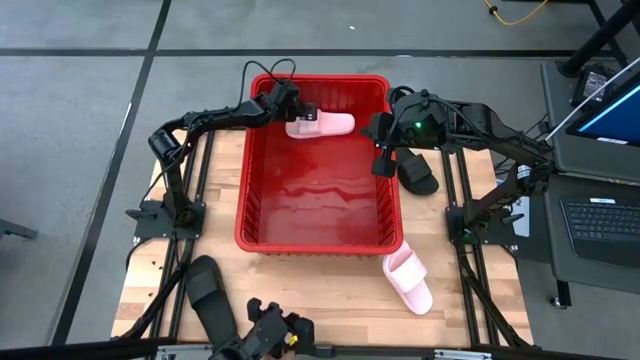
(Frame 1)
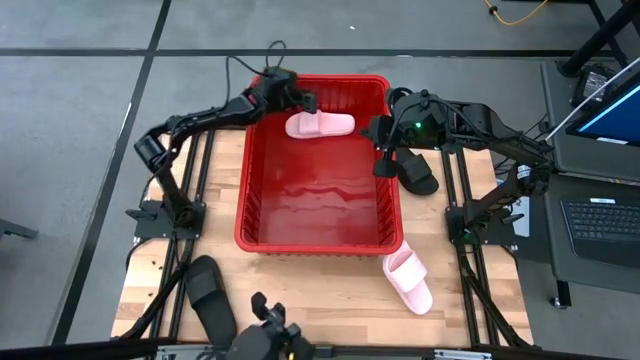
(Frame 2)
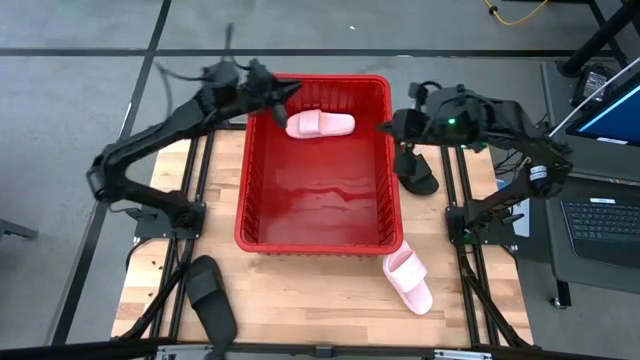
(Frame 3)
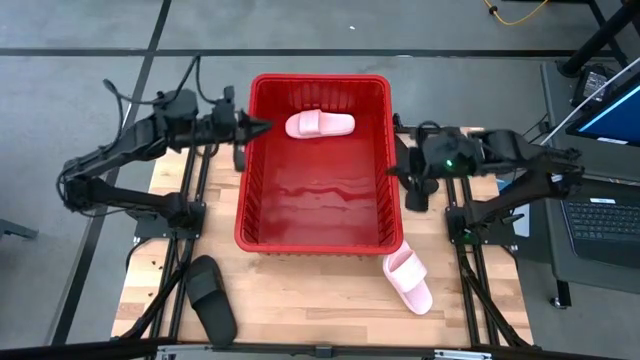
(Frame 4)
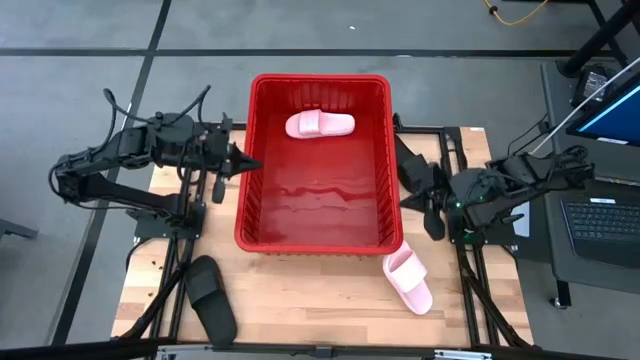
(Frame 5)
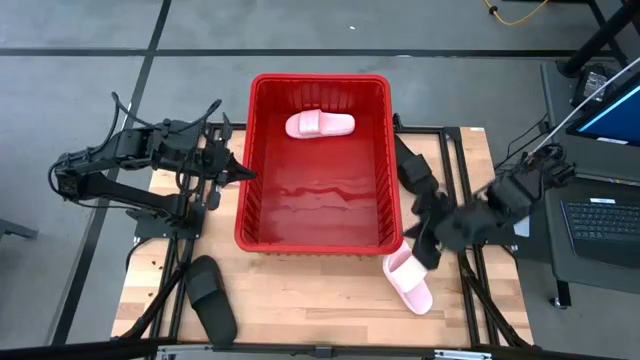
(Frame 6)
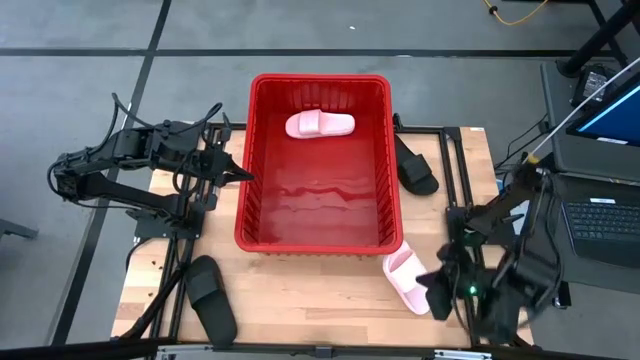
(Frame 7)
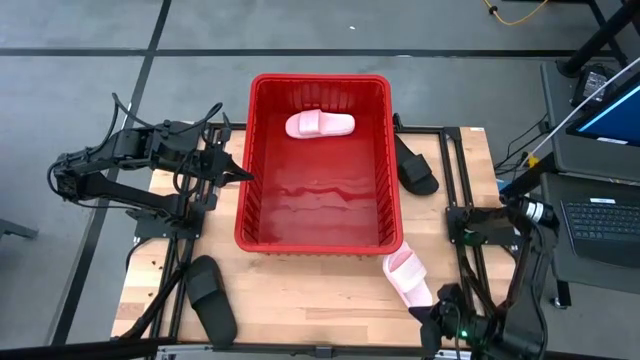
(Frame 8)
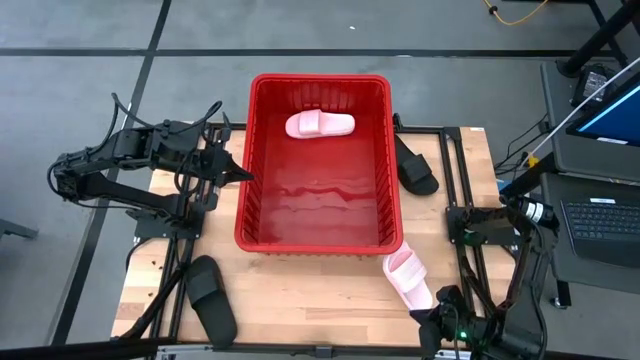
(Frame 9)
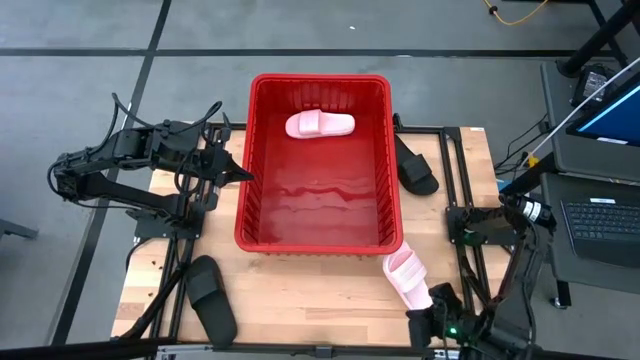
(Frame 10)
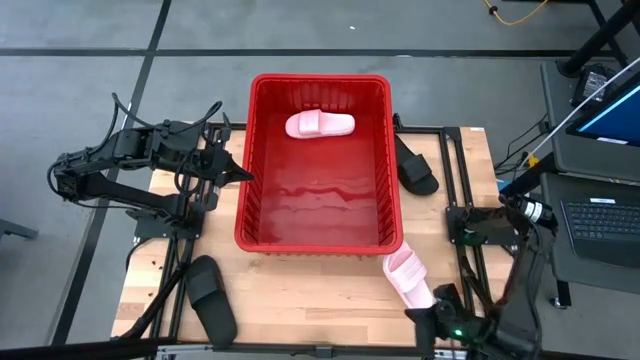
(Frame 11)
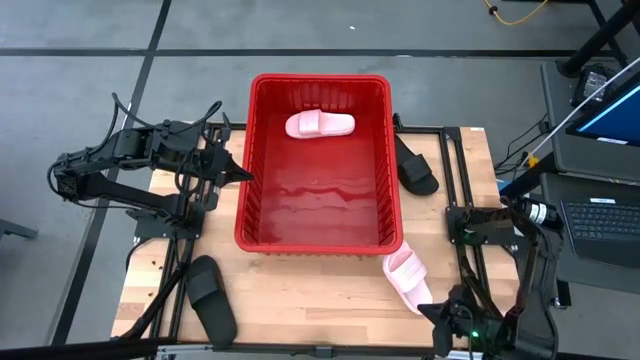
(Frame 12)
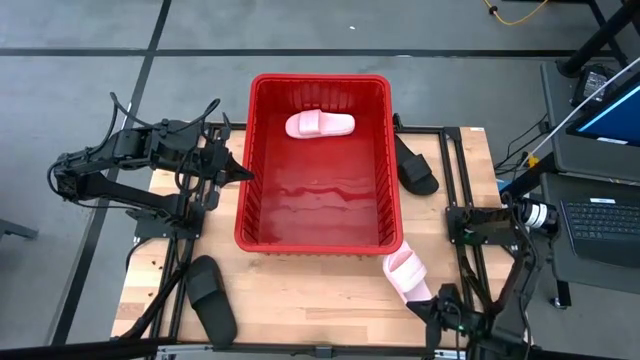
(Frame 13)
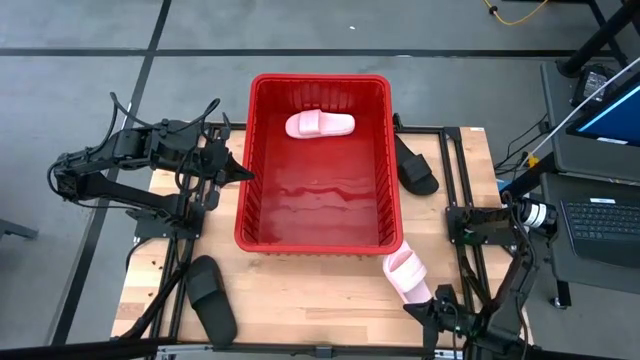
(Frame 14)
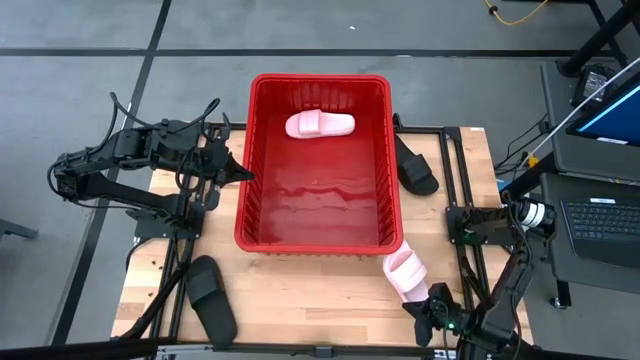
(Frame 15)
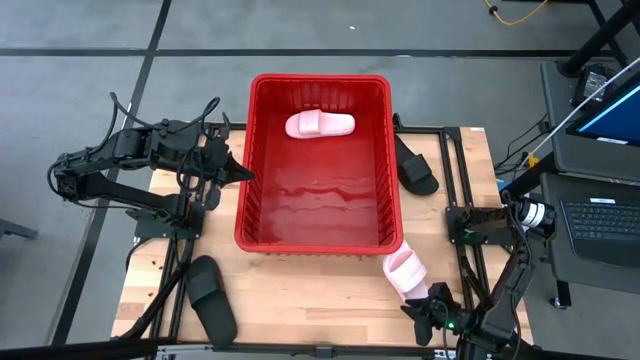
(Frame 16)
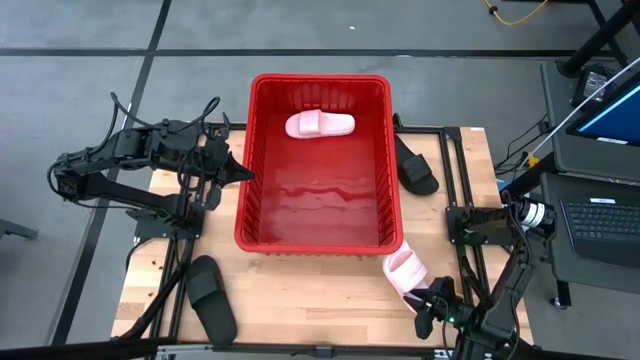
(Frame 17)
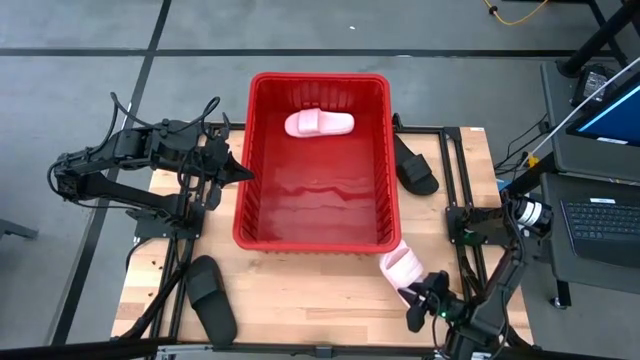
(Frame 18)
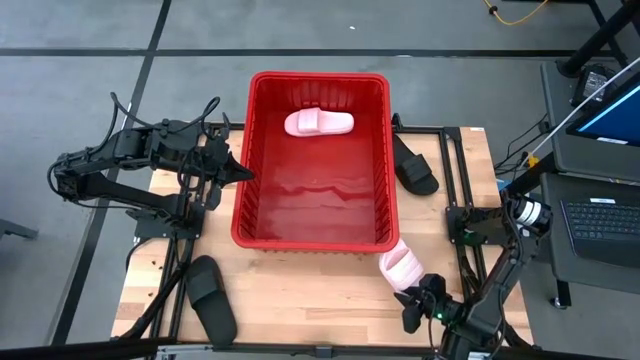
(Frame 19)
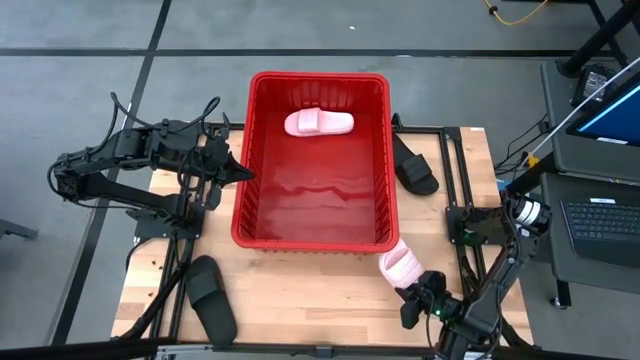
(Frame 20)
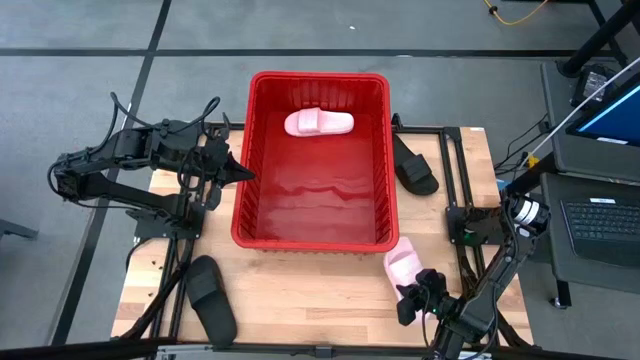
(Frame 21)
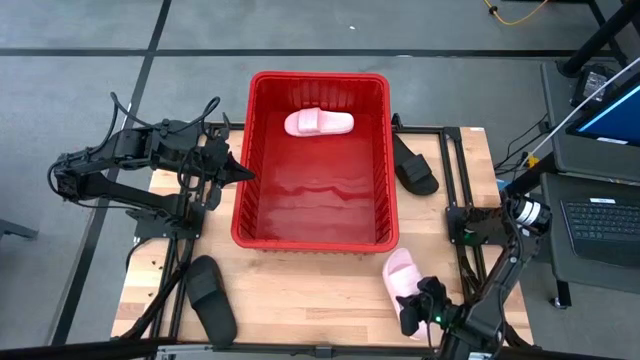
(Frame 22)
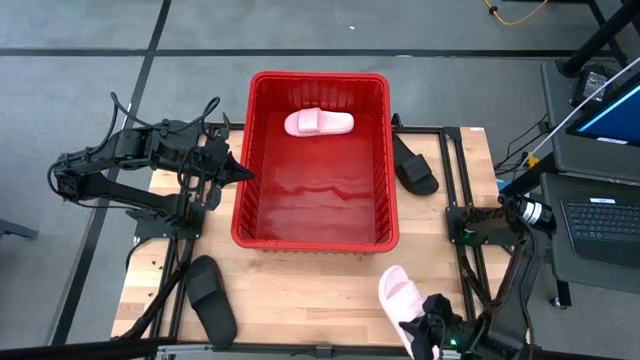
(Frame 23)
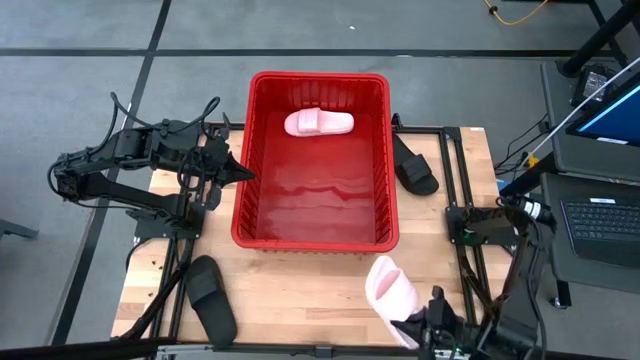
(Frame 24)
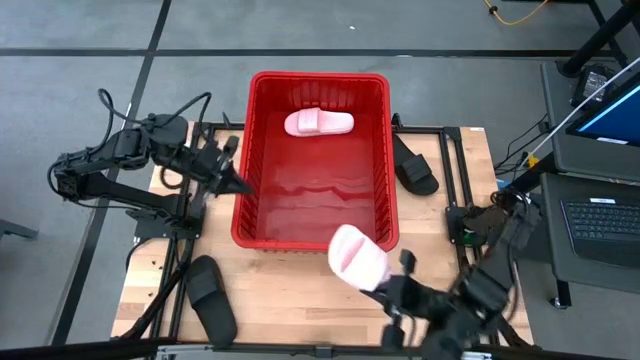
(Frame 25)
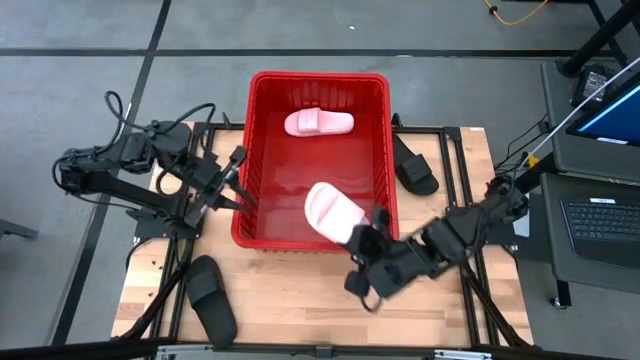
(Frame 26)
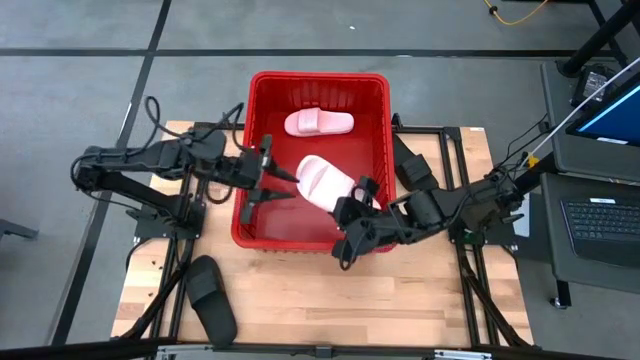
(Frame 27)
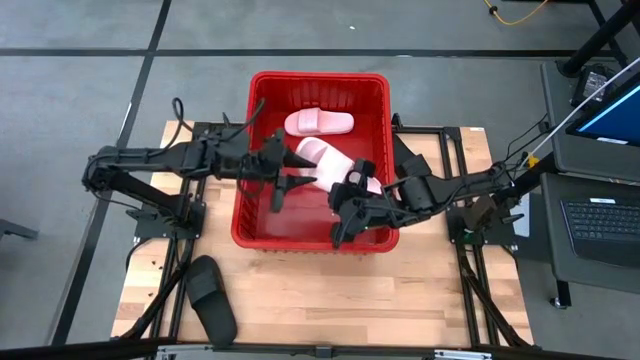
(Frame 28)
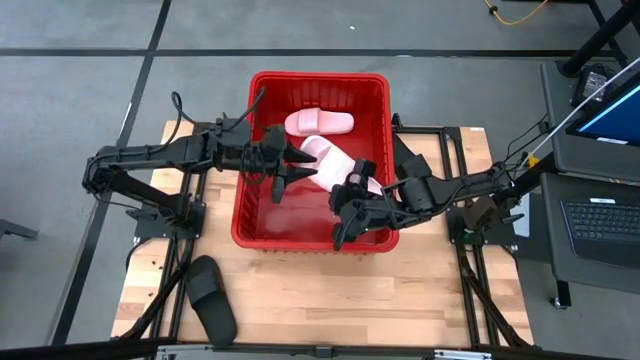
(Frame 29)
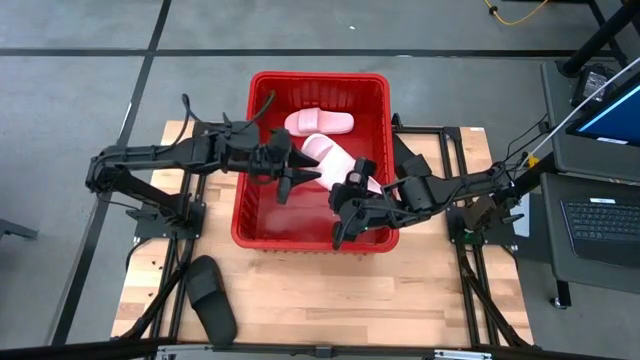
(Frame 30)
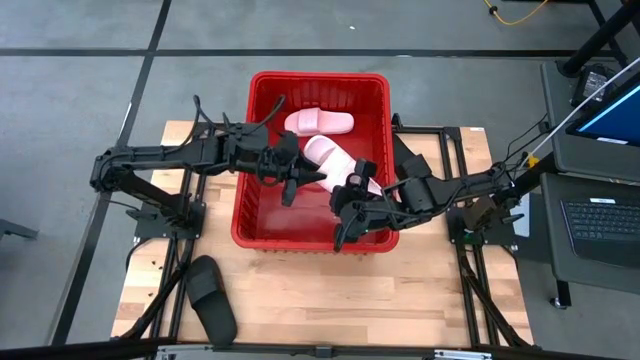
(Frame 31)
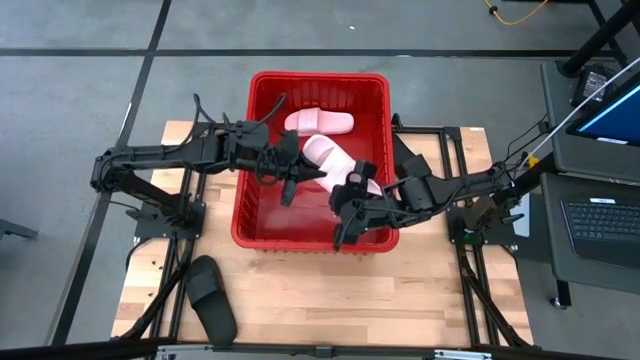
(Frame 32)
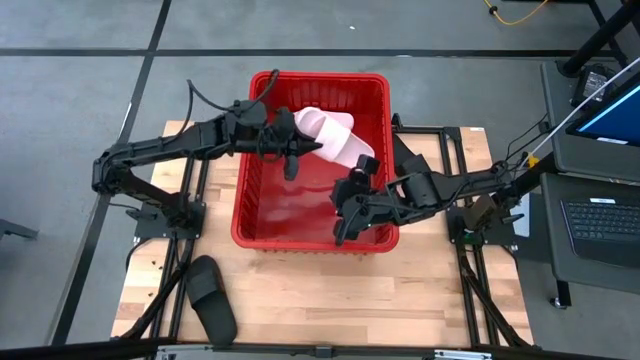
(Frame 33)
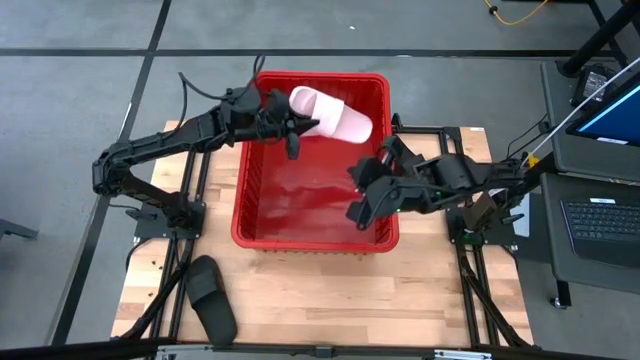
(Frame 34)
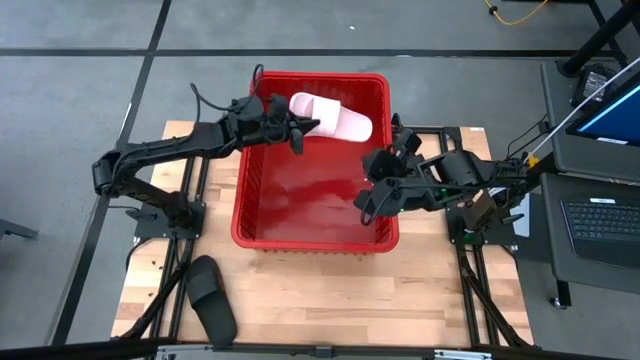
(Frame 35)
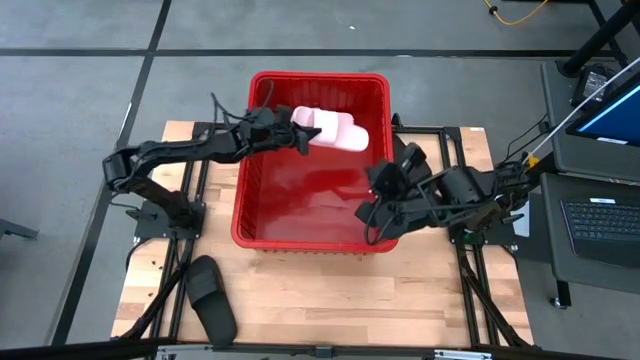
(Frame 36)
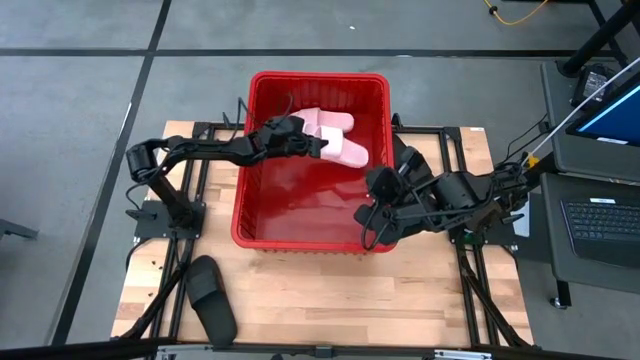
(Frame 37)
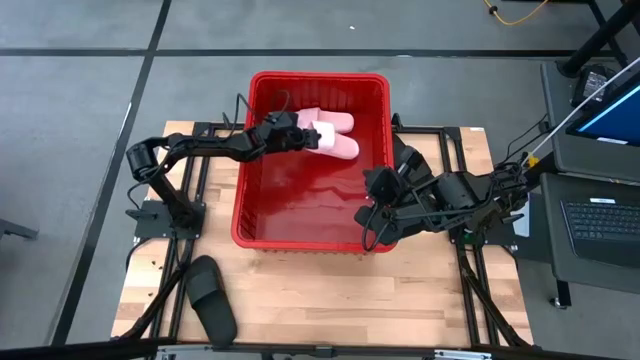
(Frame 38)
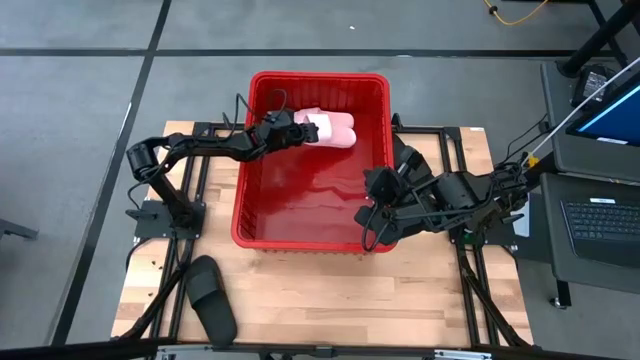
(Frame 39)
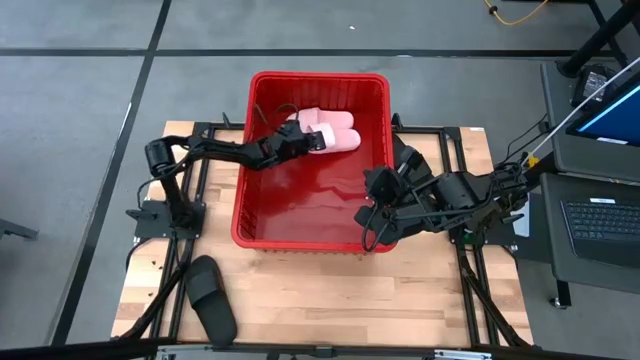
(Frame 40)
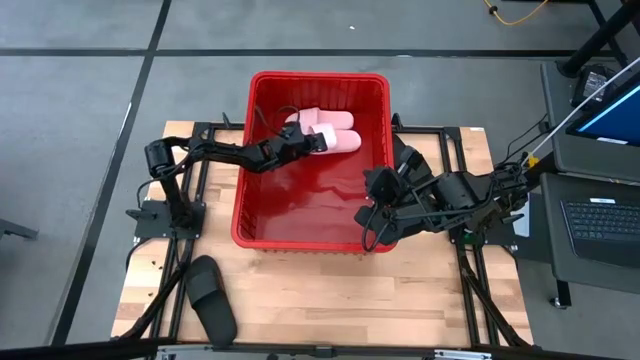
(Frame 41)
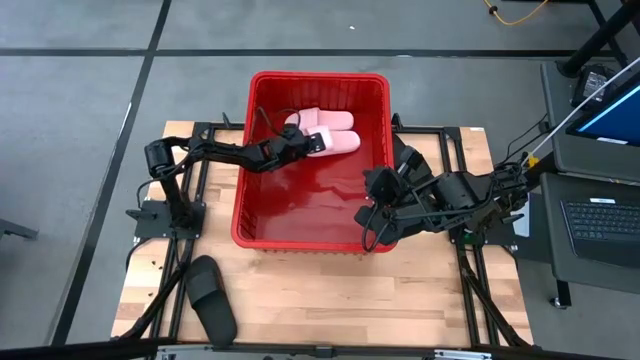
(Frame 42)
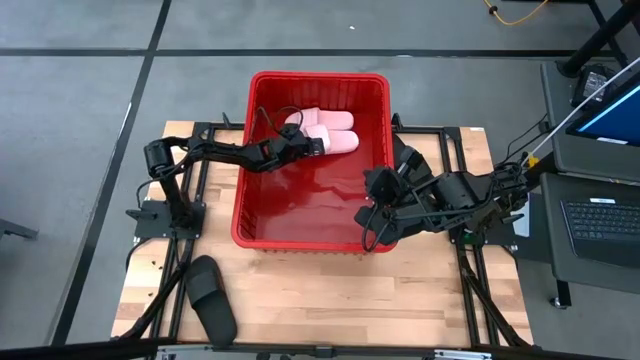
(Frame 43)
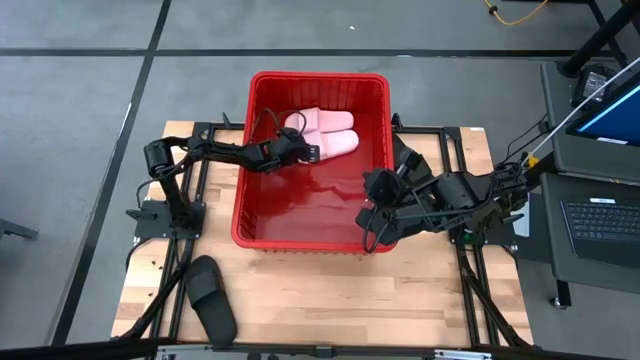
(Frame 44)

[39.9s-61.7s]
Task: Pick and place slides into bin
Put the pink slide into the bin
